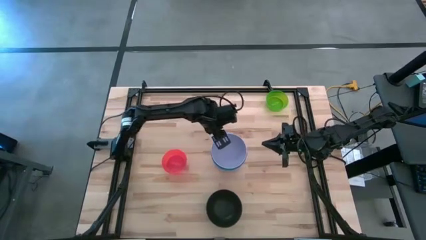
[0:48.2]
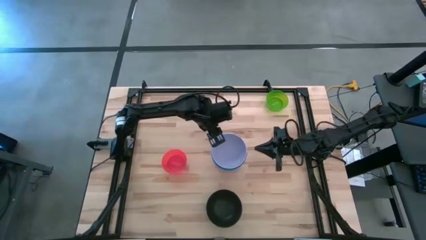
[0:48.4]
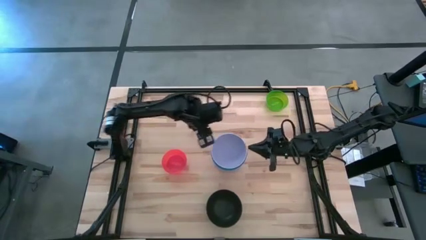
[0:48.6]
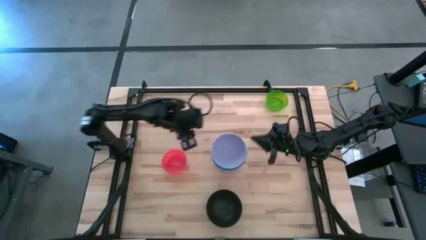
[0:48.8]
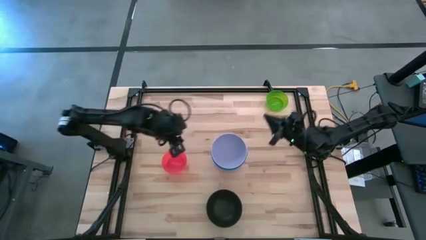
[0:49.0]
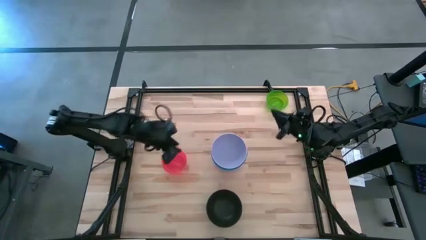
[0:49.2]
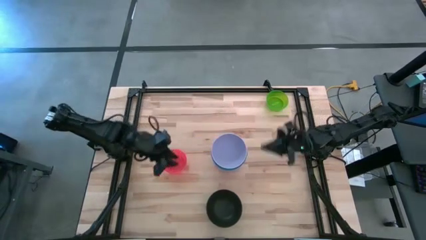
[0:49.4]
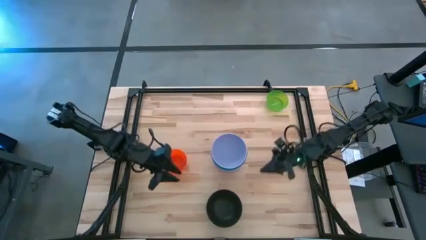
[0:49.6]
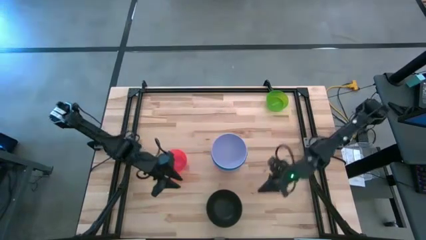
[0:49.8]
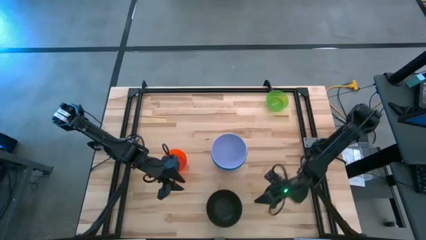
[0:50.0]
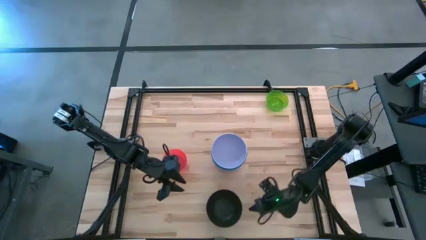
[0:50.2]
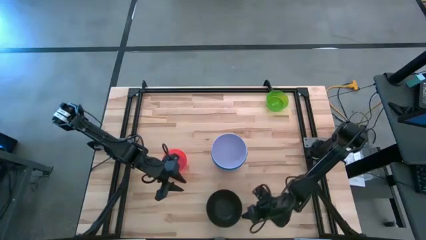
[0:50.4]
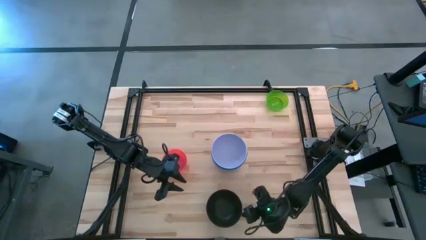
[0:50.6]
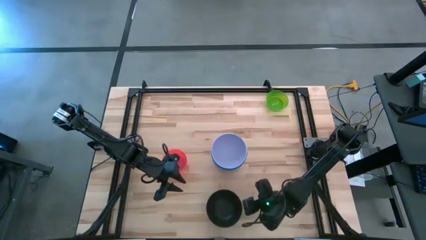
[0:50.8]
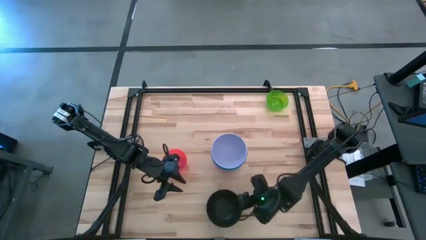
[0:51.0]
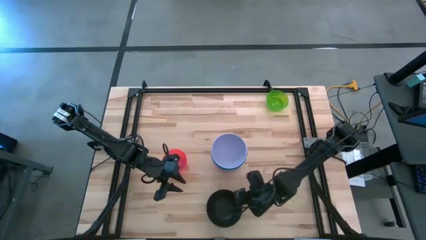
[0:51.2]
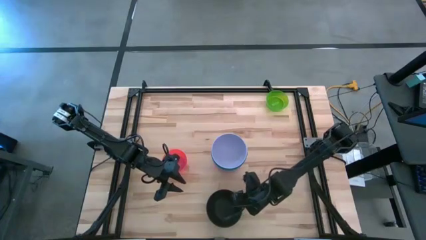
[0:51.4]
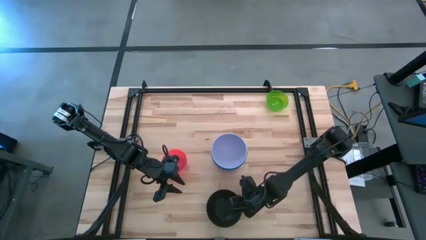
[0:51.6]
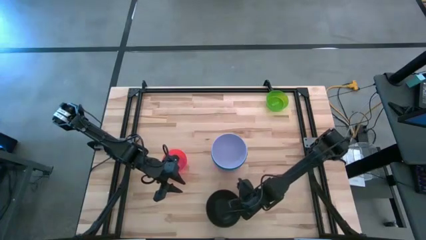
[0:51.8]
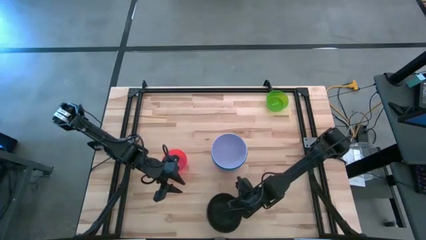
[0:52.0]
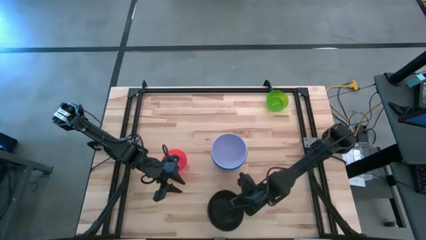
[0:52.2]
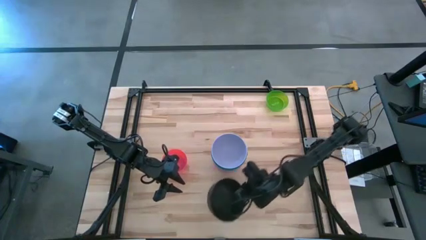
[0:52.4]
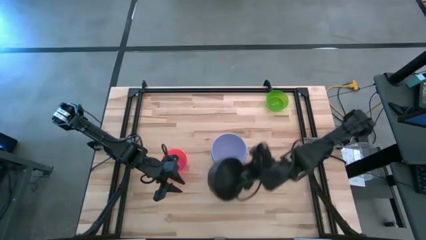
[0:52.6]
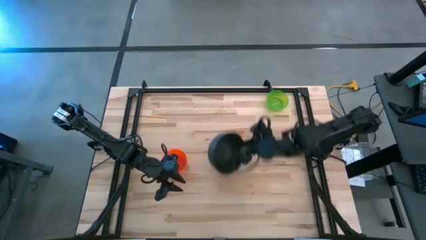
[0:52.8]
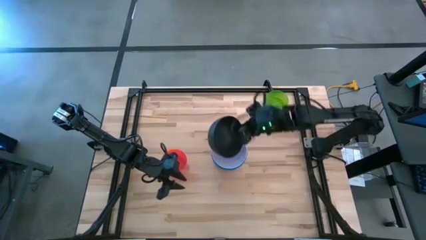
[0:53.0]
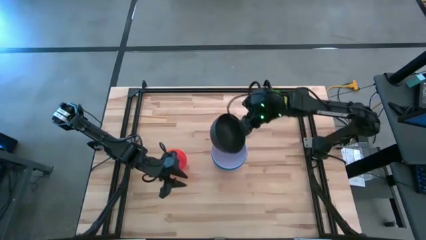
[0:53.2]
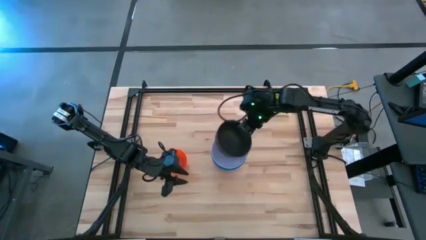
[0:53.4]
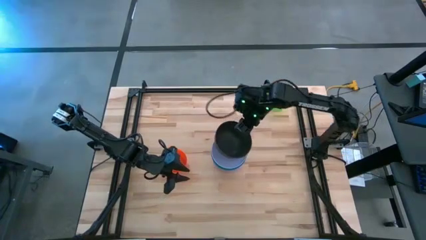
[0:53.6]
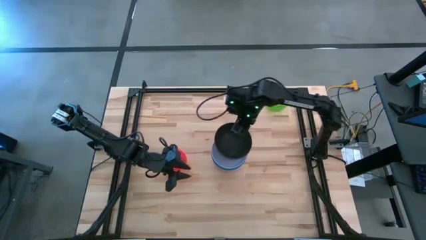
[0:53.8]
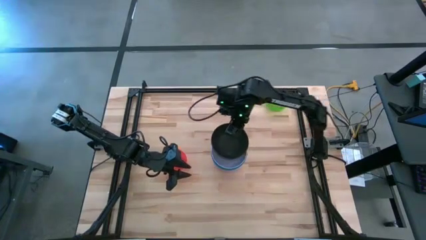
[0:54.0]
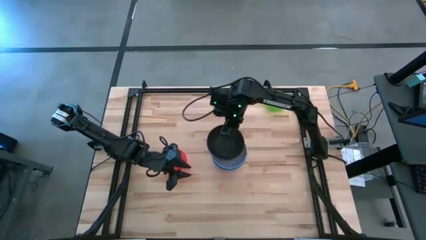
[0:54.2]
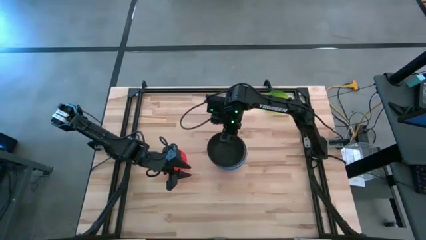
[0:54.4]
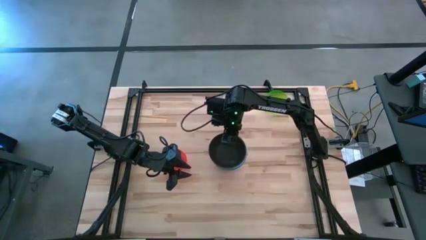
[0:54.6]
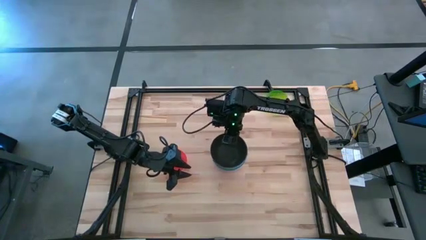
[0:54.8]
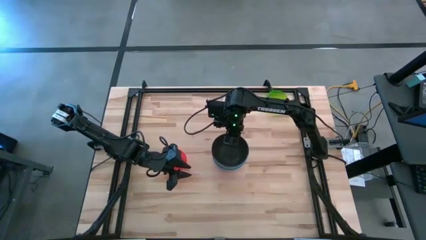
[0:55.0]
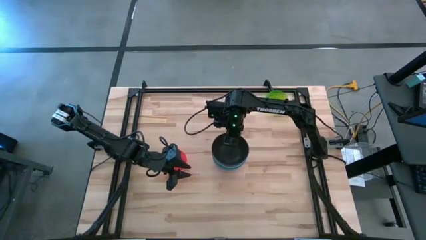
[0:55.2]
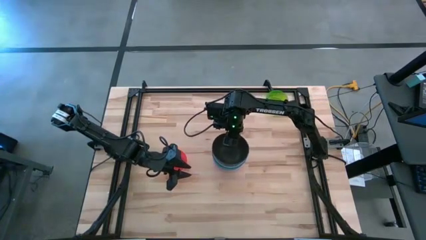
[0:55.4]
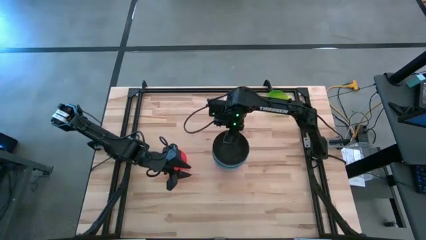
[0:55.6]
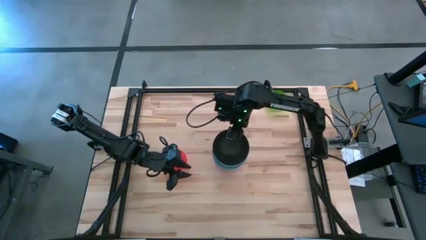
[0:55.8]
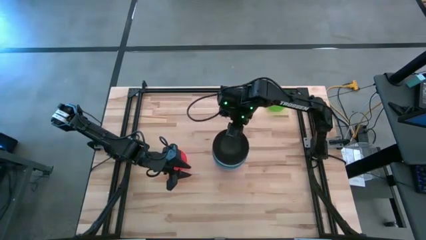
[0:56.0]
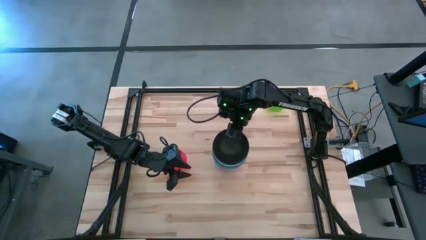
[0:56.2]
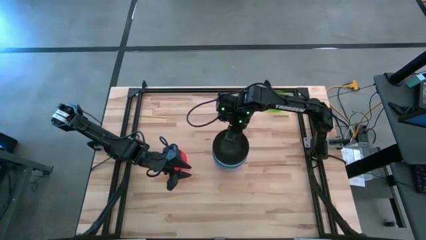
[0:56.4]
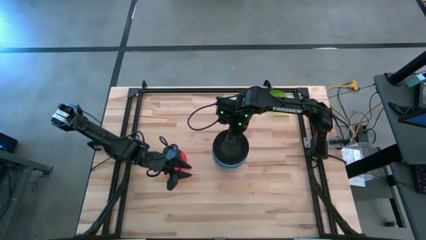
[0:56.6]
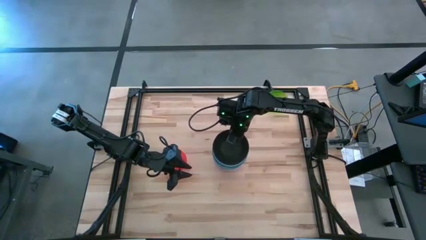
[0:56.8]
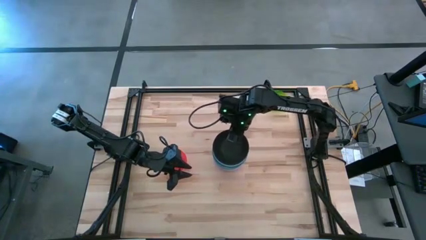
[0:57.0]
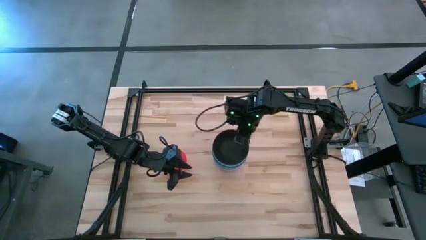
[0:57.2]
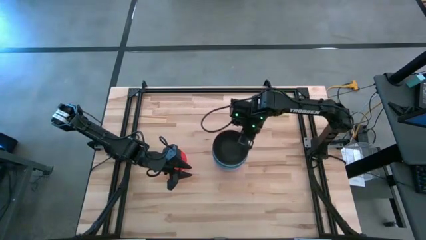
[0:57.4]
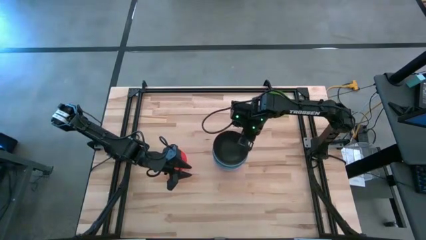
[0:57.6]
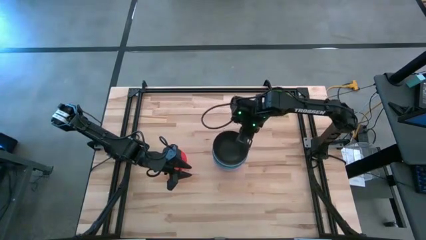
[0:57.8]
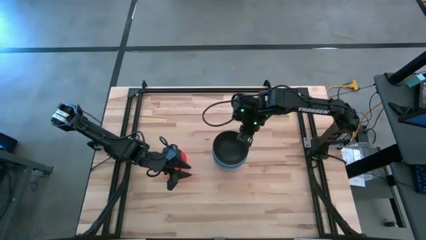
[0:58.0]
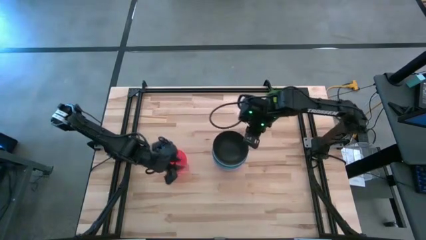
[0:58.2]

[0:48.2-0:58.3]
Task: Nest bowls inside each other
Stack the black bowl on top of the violet bowl

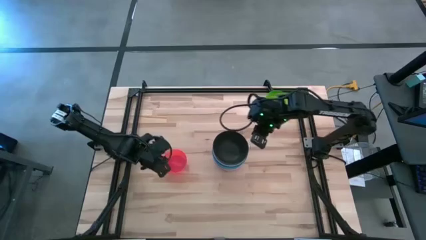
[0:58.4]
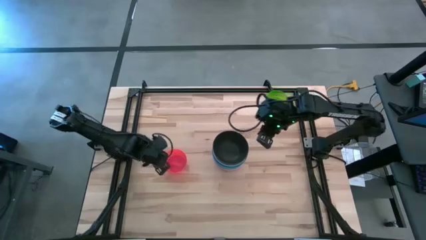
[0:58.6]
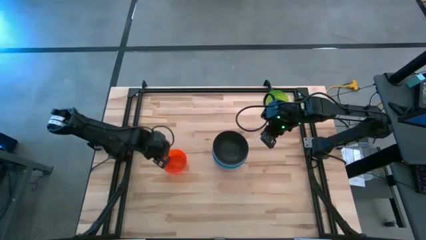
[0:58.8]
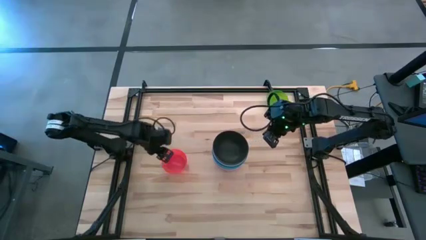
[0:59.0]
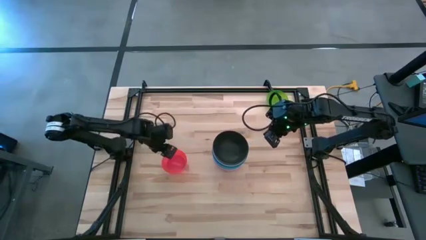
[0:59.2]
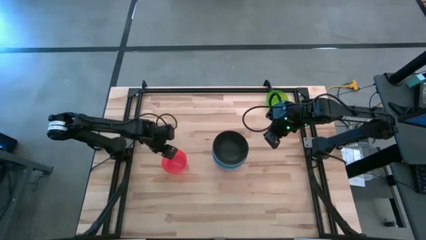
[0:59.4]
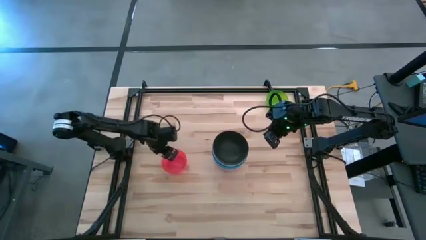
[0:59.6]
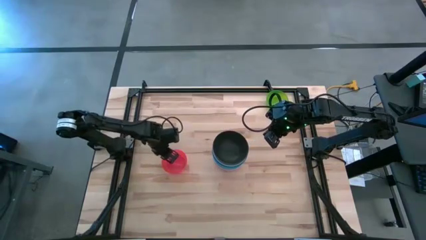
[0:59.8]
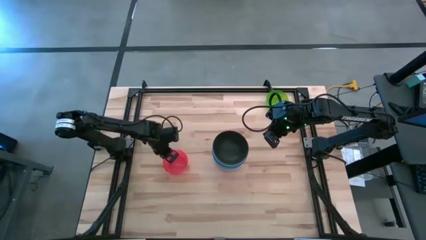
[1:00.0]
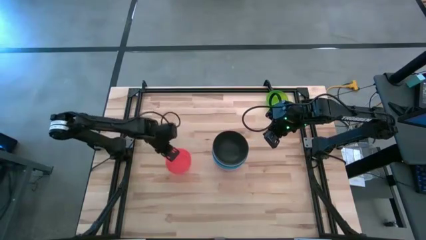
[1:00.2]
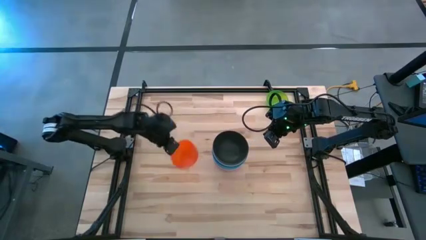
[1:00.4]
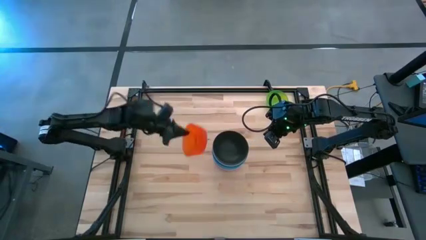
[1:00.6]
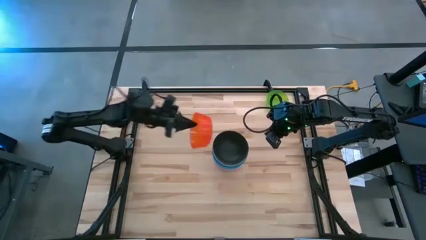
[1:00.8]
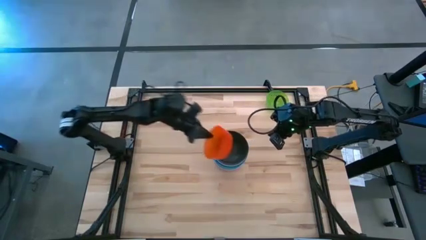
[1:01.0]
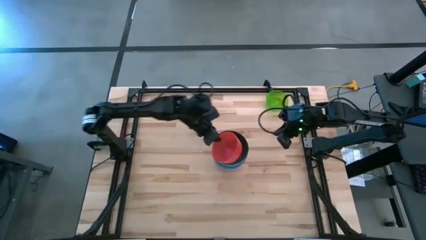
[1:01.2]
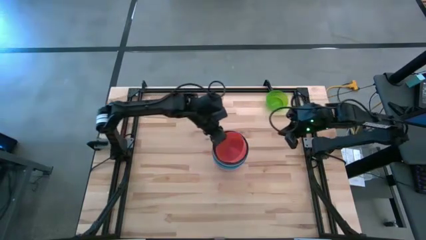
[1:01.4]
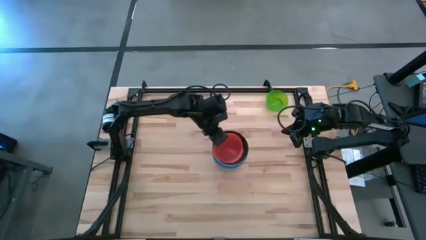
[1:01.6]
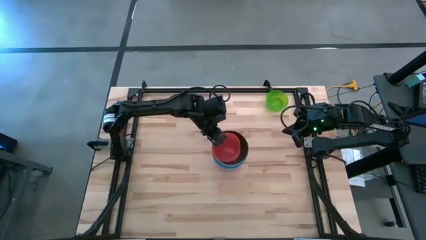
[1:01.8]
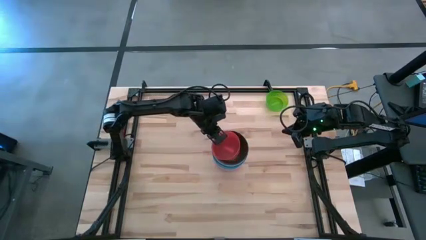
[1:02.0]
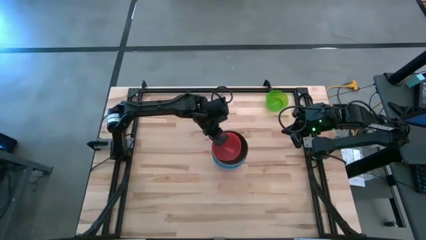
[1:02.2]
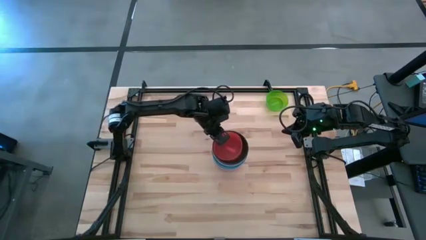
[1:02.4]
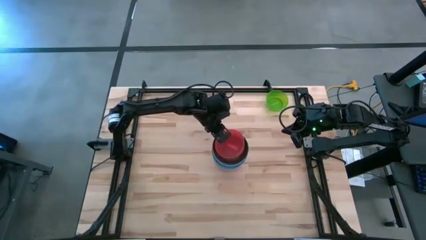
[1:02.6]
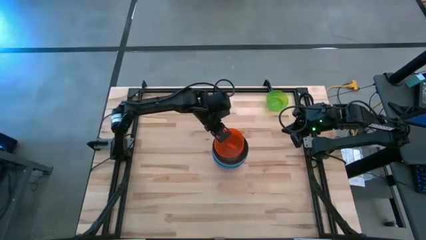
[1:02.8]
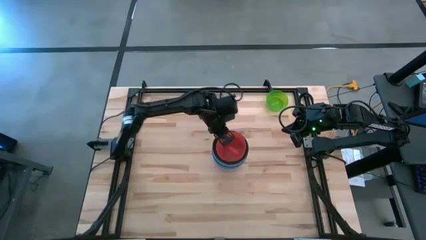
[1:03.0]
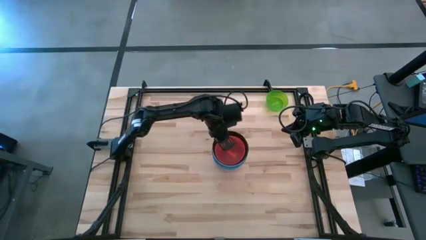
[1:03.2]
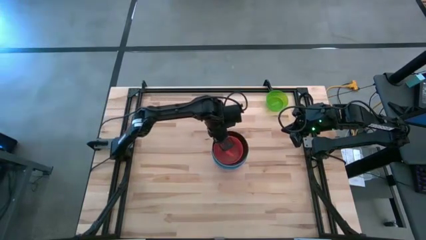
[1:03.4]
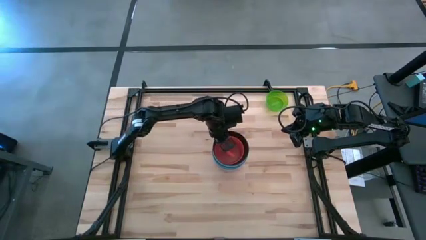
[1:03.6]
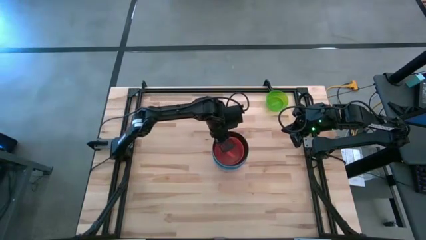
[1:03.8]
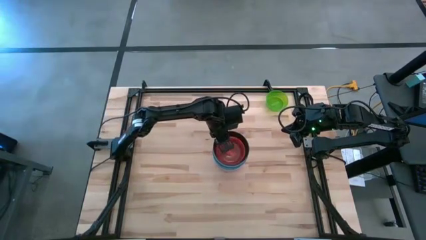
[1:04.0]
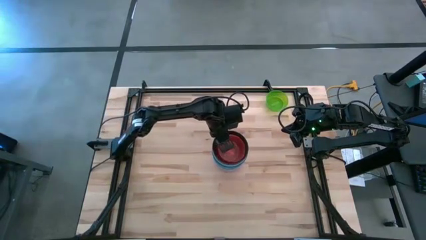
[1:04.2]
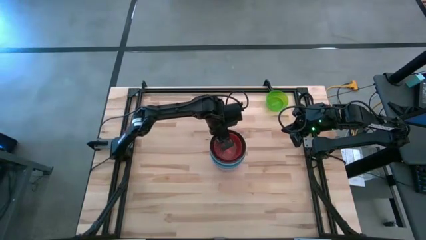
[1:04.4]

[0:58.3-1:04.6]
Stack the small orange bowl on top of the black bowl
